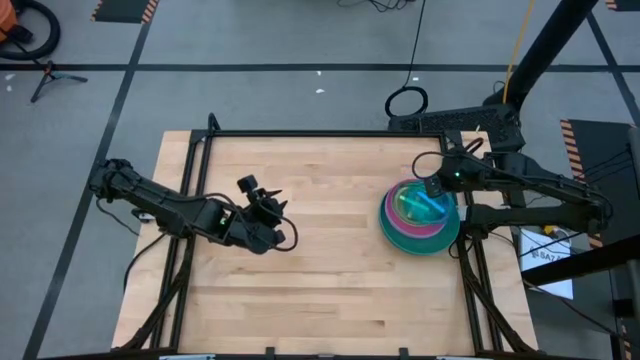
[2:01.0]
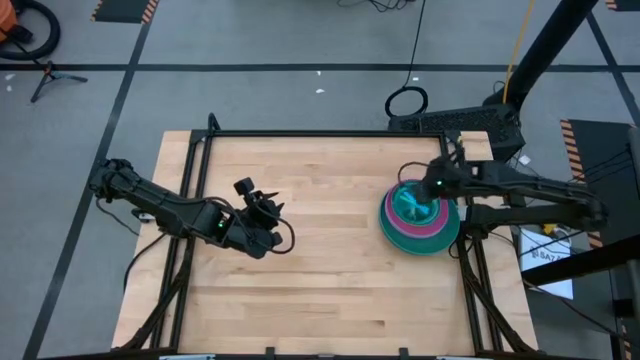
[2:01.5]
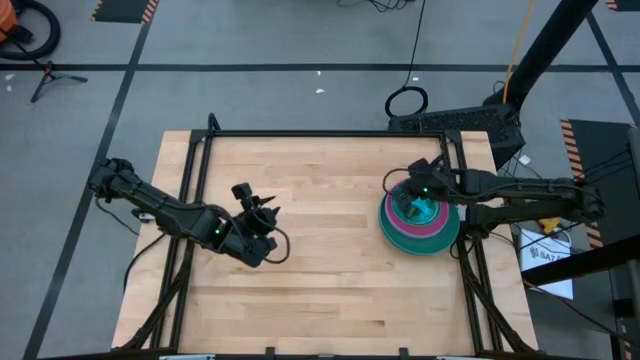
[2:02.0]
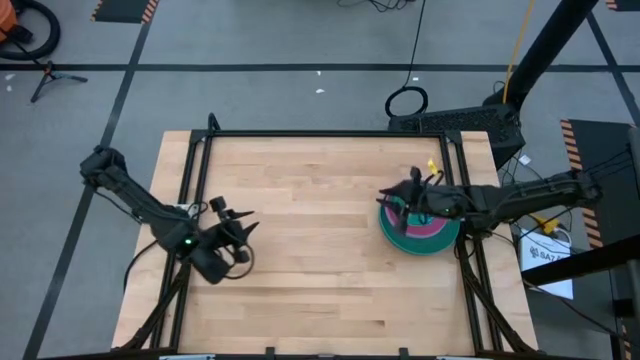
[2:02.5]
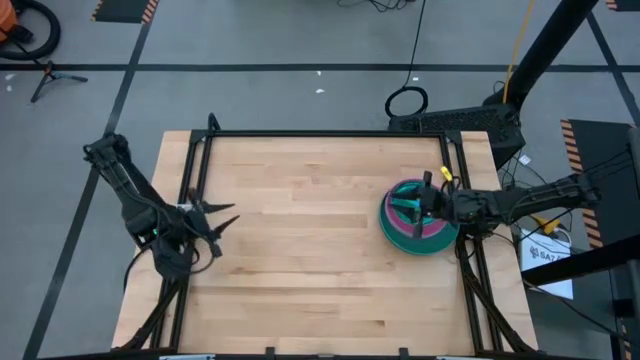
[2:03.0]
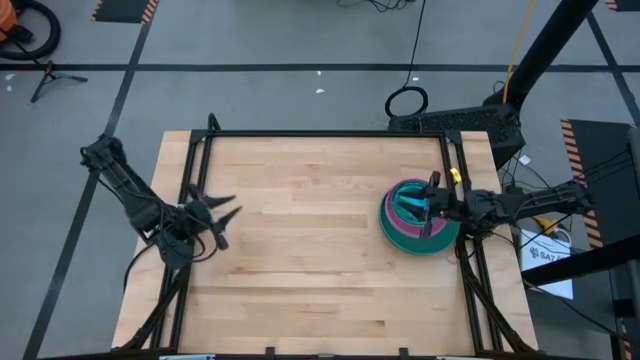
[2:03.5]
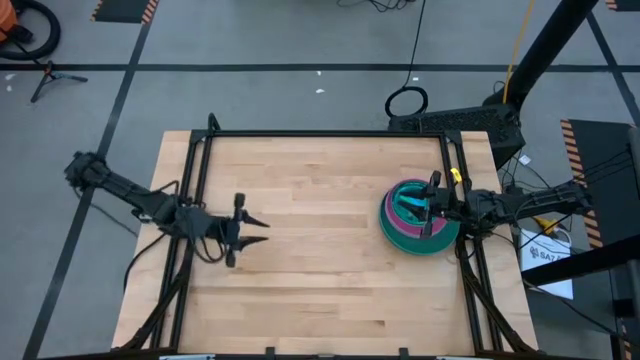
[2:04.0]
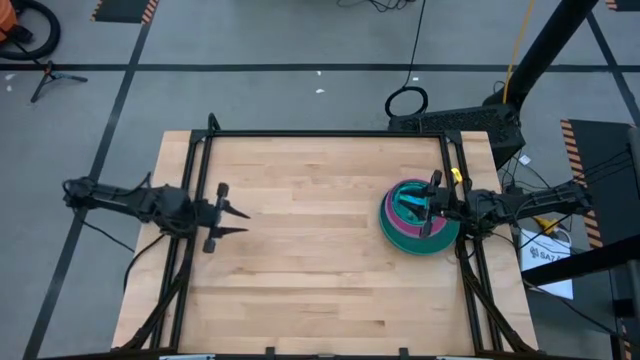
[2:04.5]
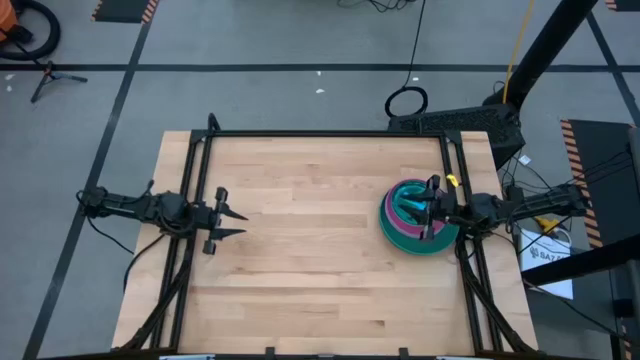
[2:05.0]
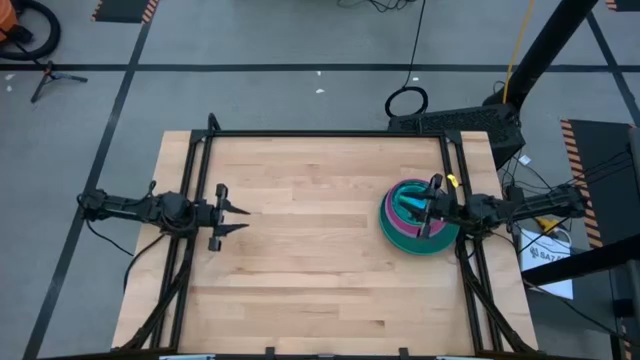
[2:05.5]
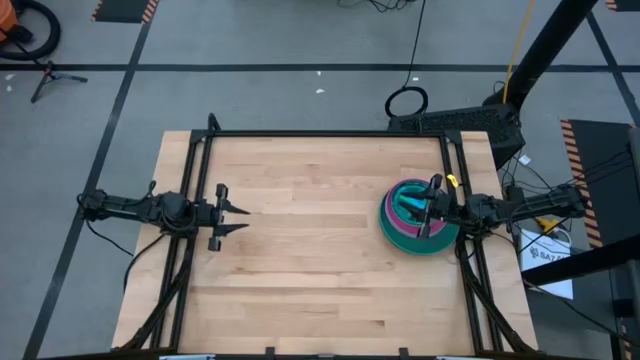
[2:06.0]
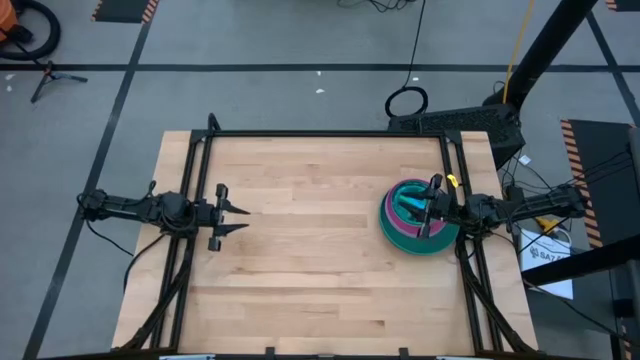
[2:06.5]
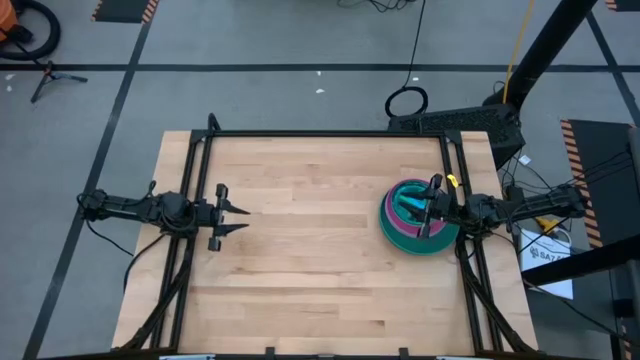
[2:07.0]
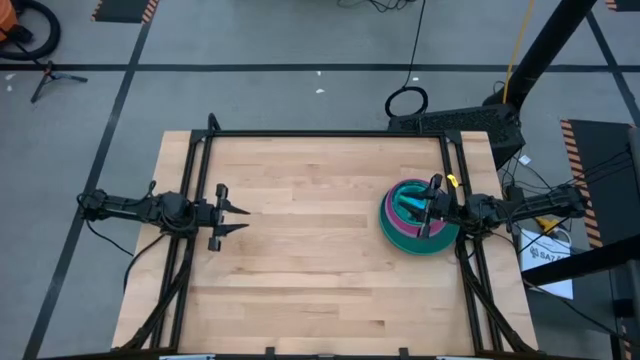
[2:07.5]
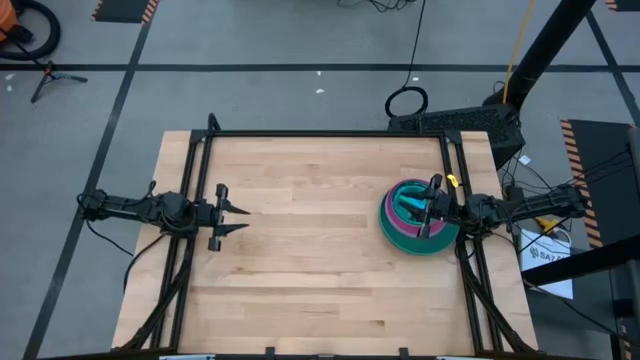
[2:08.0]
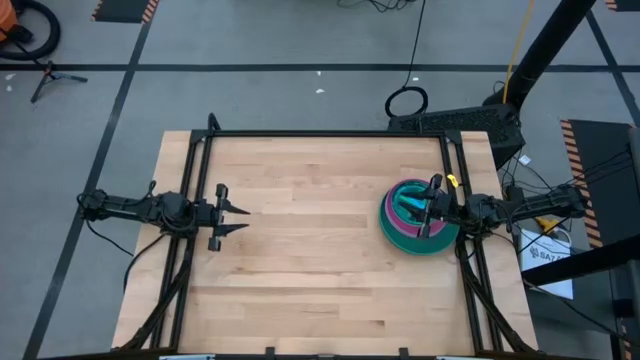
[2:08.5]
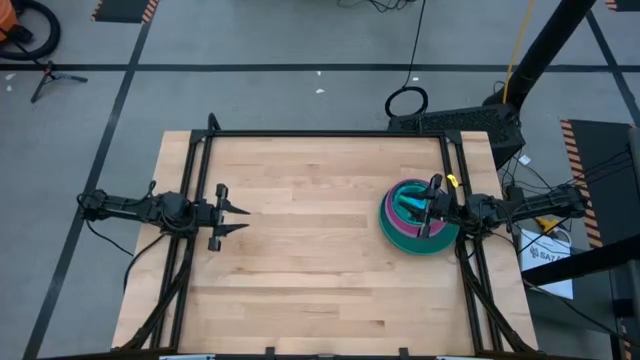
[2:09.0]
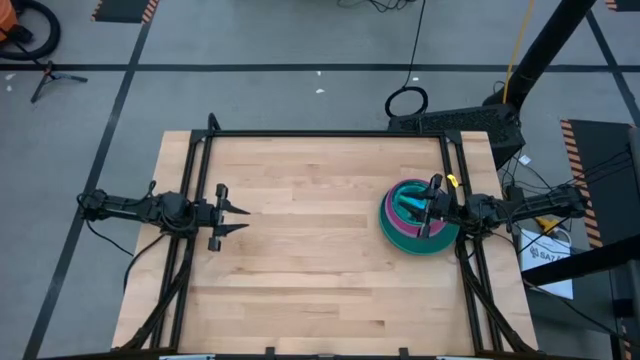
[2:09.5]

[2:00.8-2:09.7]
Task: Stack plastic plates
Return to Home Position

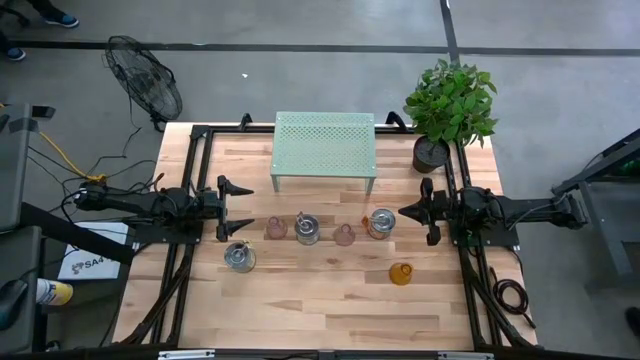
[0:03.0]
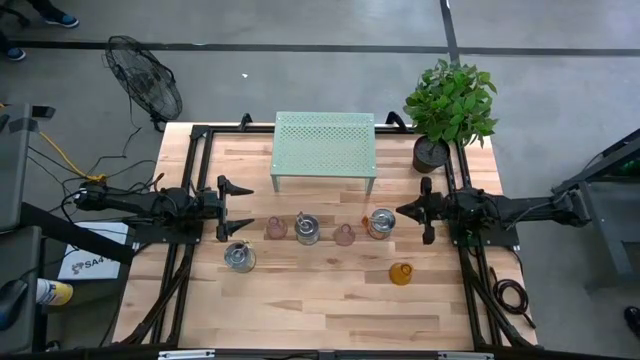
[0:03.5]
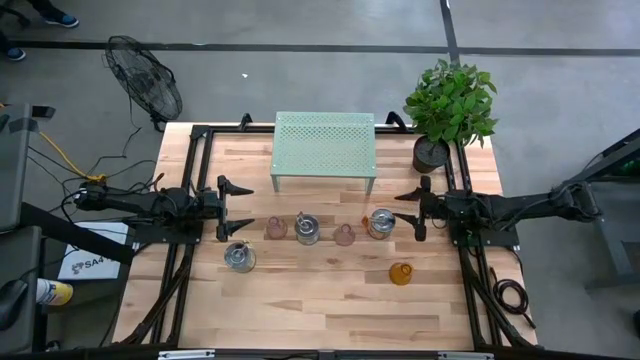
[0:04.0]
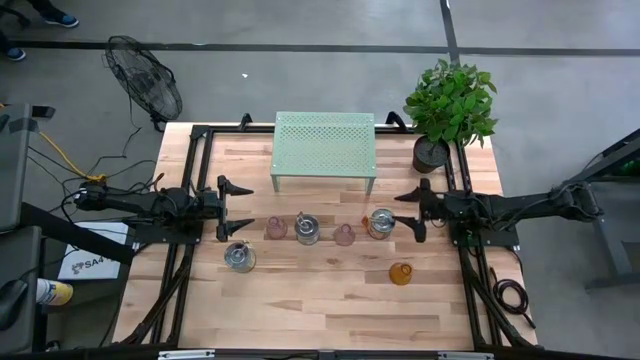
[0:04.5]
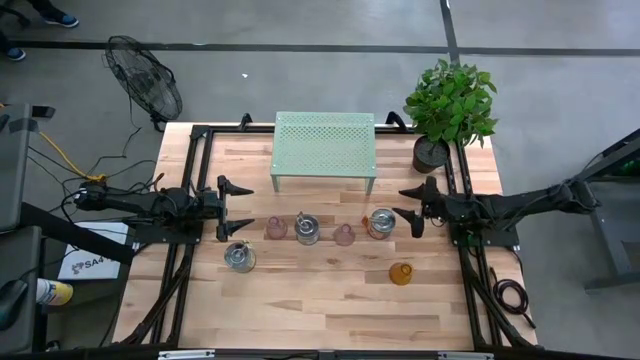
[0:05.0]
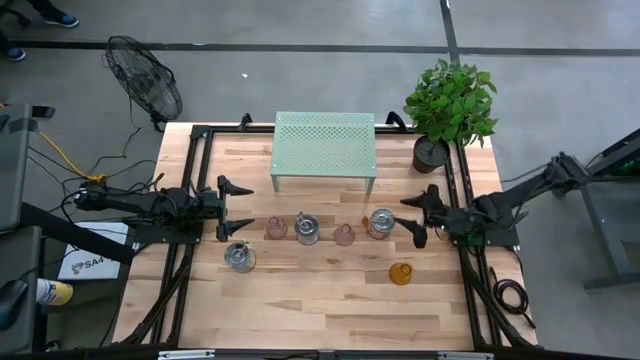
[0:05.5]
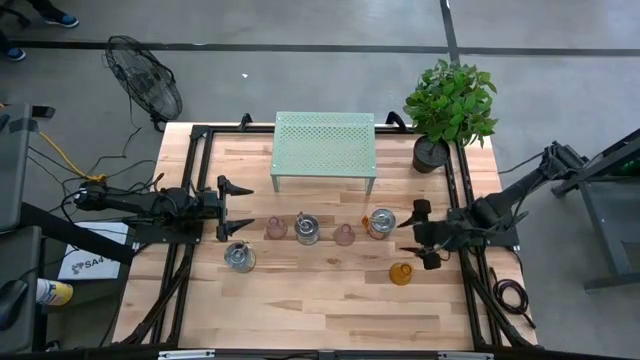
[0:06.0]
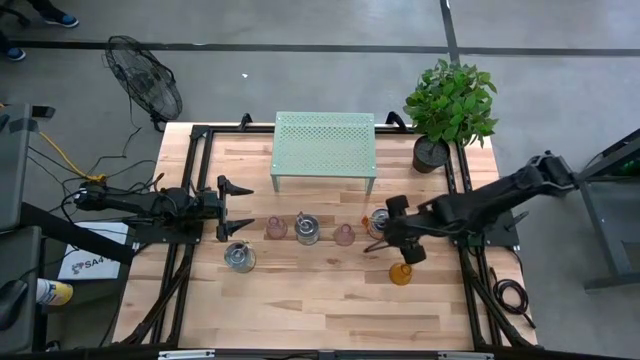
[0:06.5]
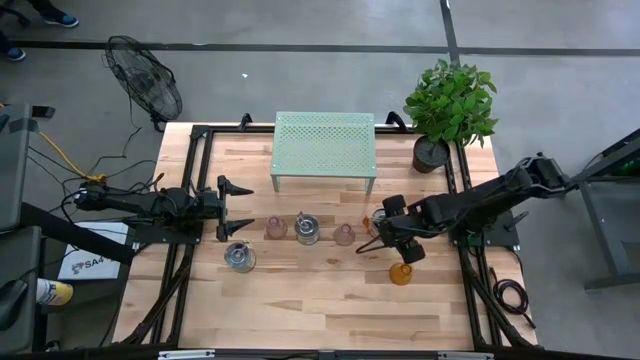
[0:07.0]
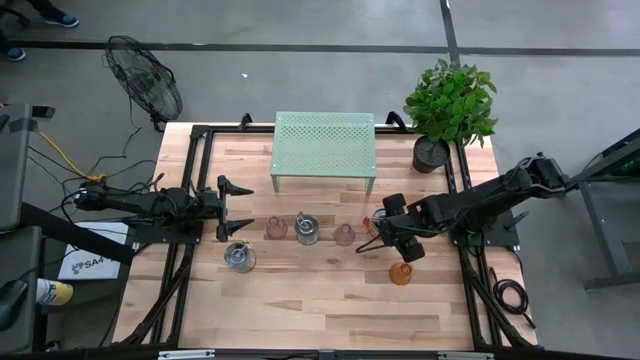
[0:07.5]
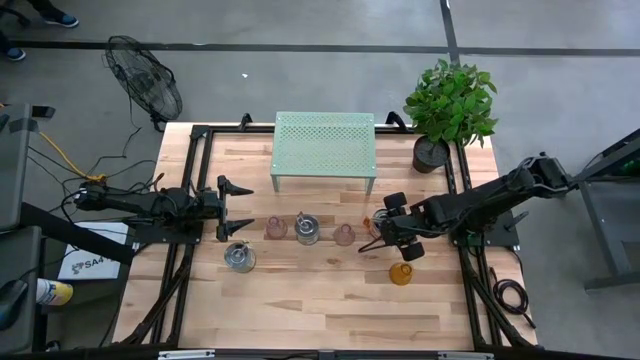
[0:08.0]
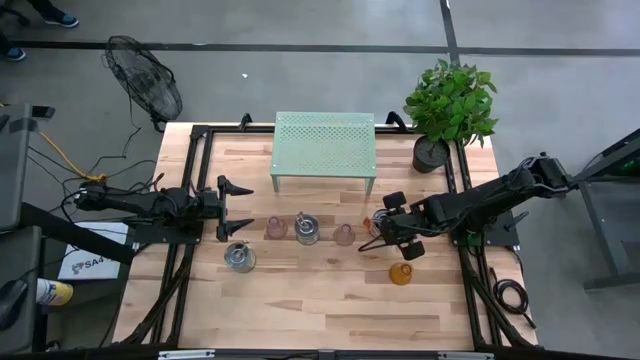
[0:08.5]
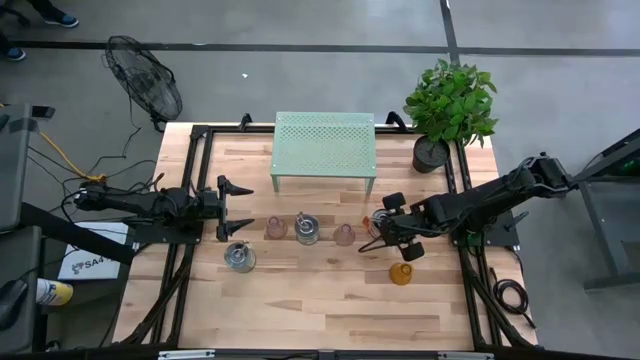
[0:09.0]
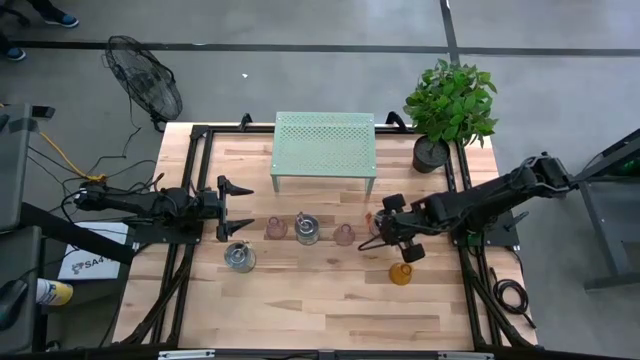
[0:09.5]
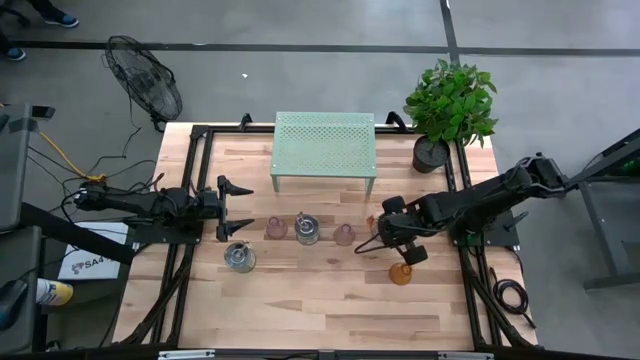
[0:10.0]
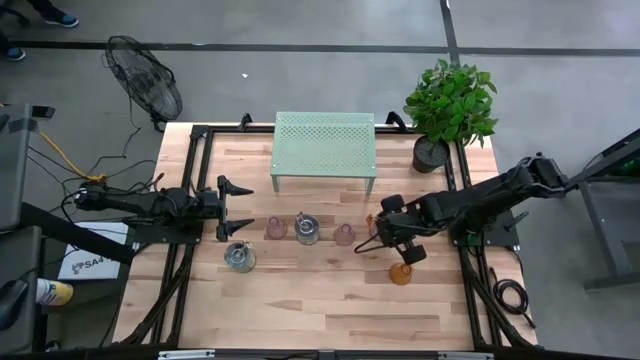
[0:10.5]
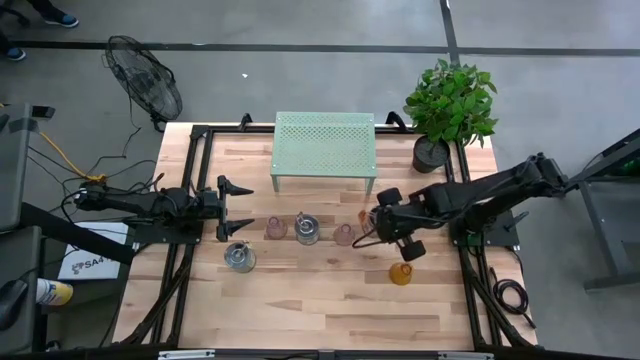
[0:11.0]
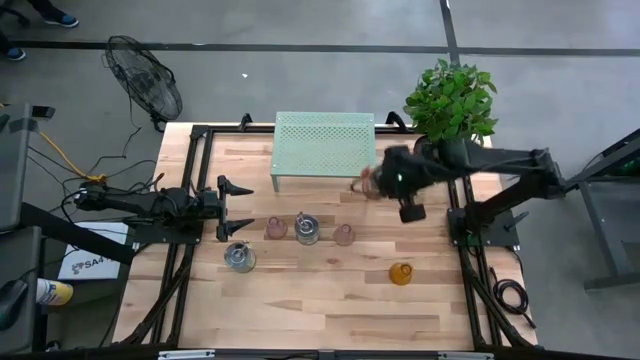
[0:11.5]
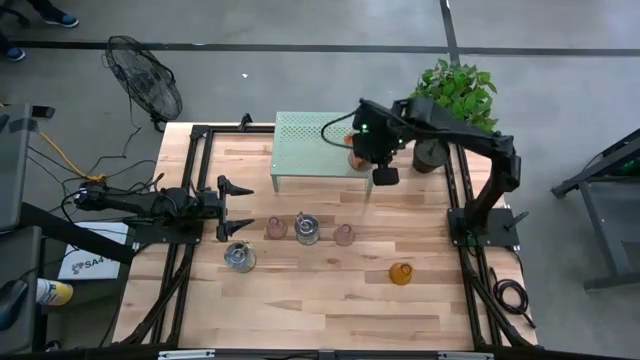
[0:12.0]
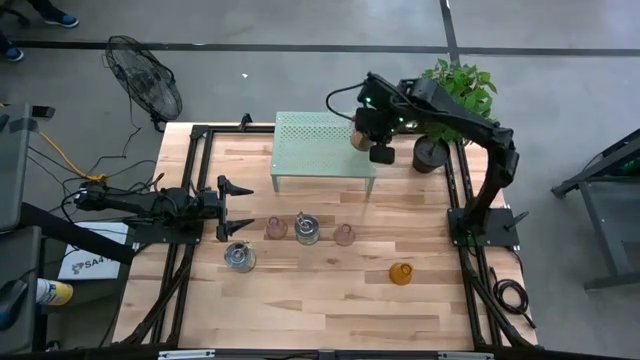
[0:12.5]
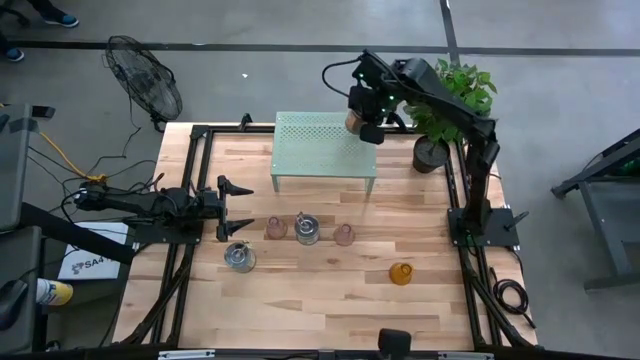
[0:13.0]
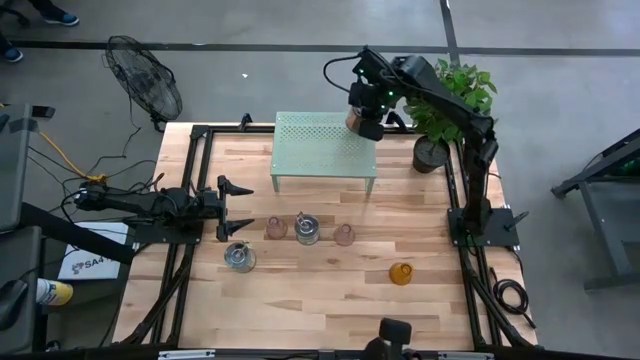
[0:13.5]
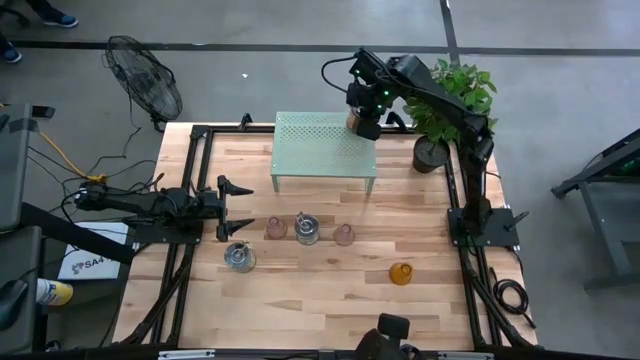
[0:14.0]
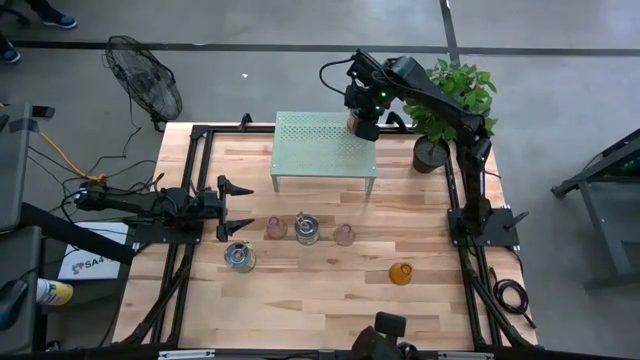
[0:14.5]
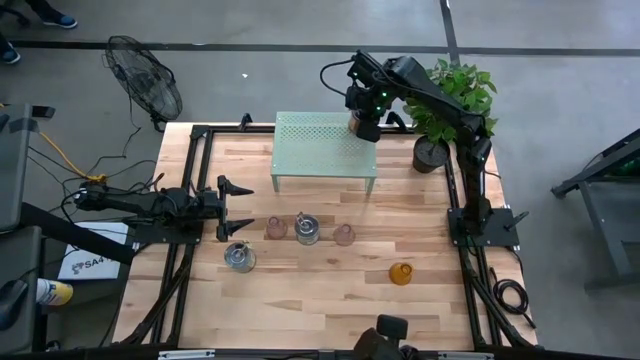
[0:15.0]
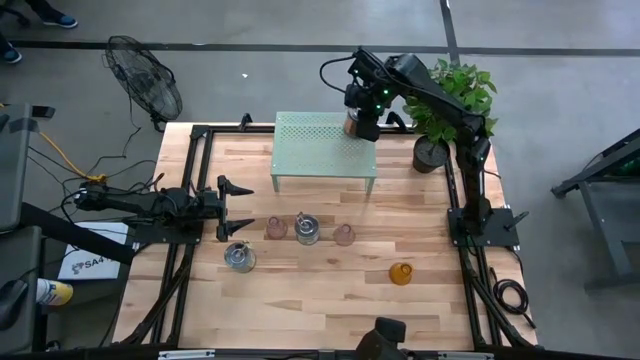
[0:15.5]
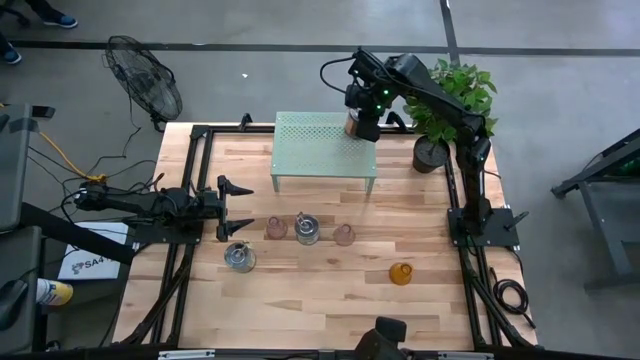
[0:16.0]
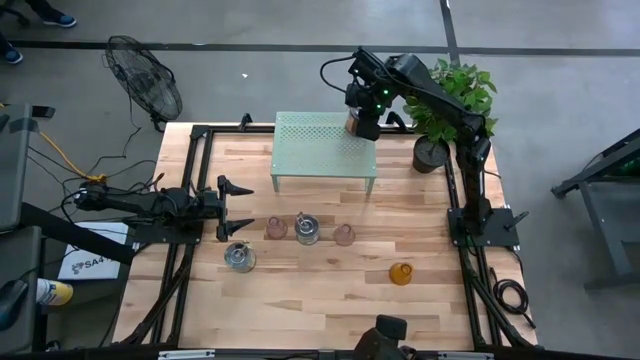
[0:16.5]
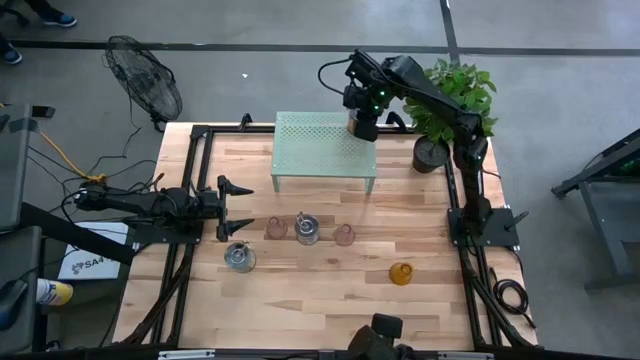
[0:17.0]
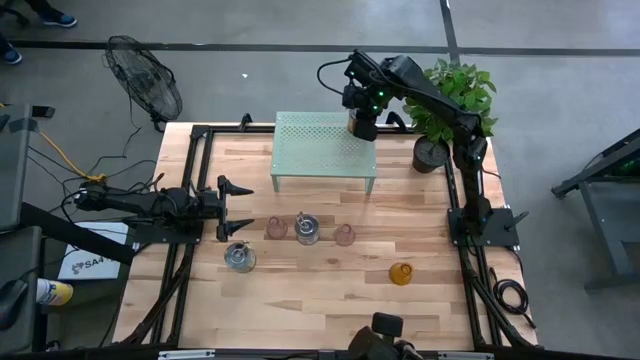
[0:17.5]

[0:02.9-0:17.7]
Task: Pick & Place candle stick holders
Put the right silver candle on the shelf
